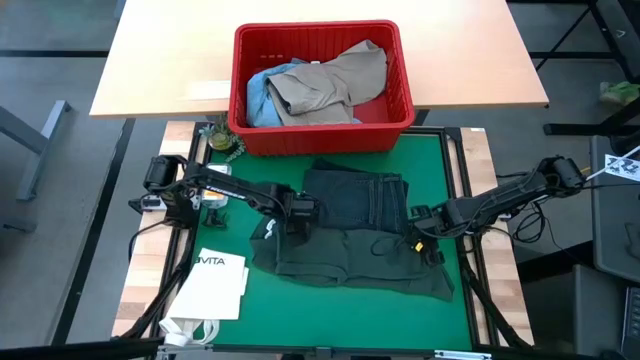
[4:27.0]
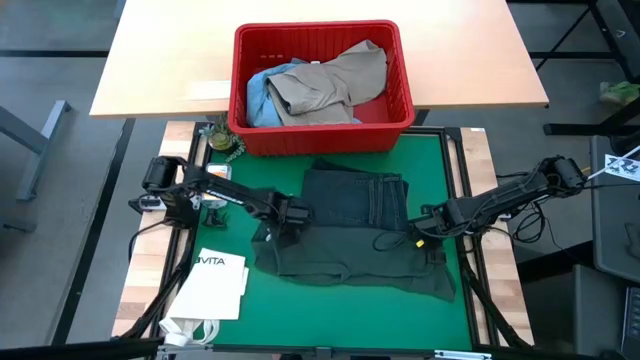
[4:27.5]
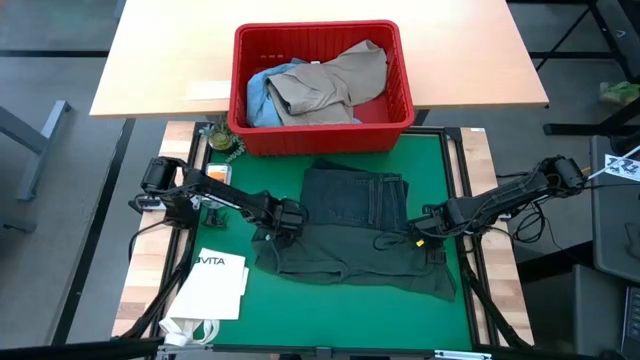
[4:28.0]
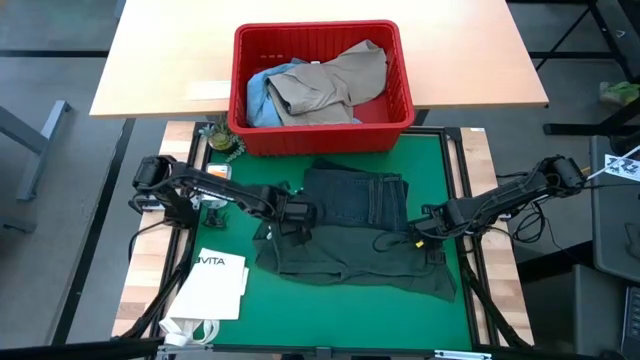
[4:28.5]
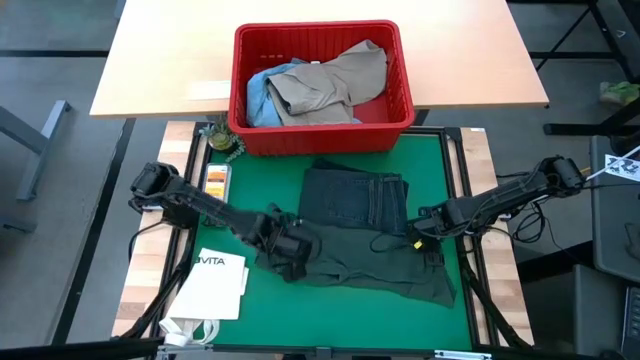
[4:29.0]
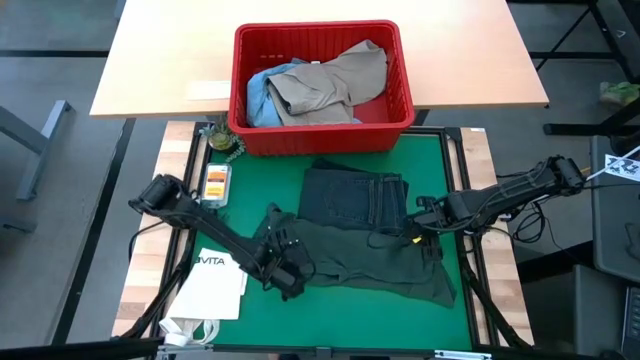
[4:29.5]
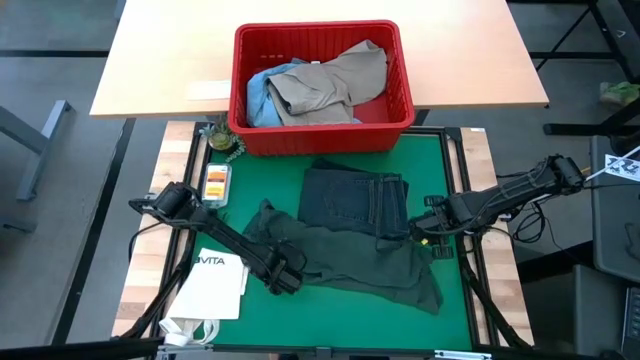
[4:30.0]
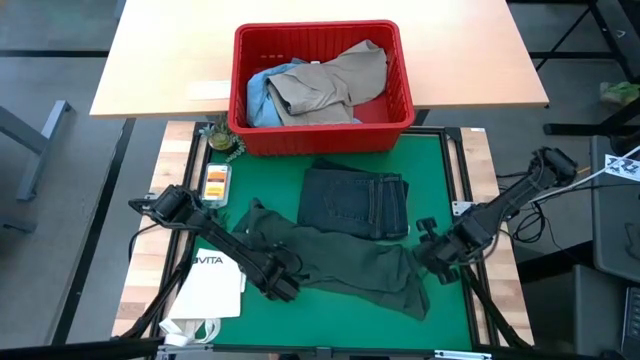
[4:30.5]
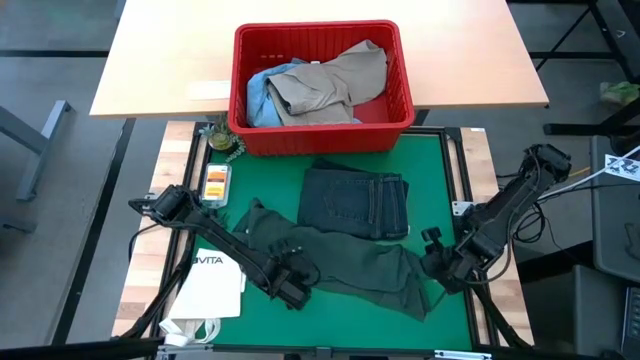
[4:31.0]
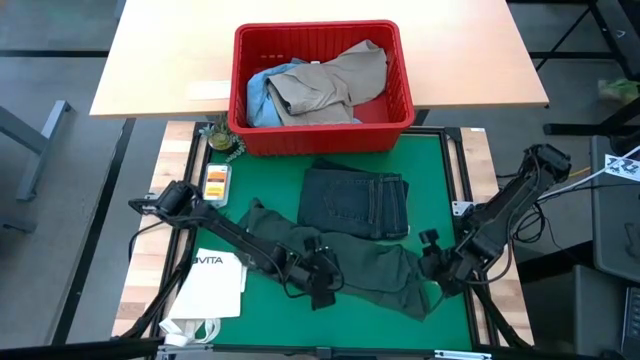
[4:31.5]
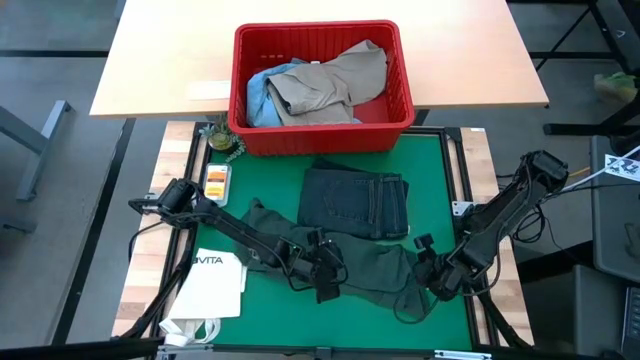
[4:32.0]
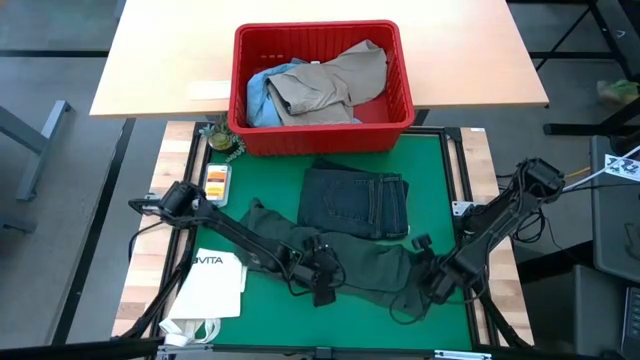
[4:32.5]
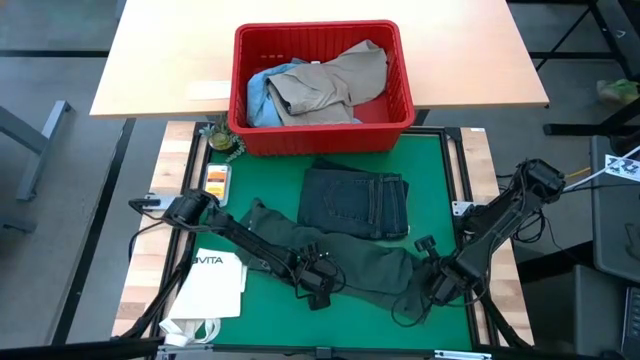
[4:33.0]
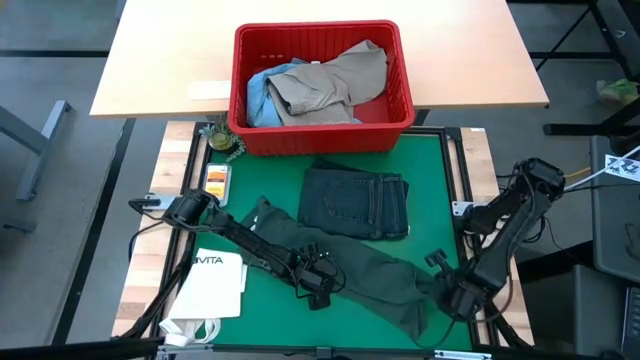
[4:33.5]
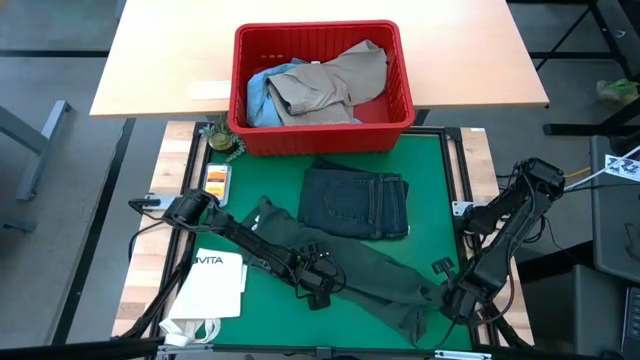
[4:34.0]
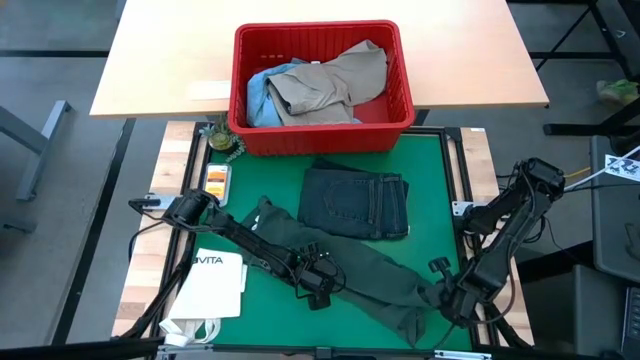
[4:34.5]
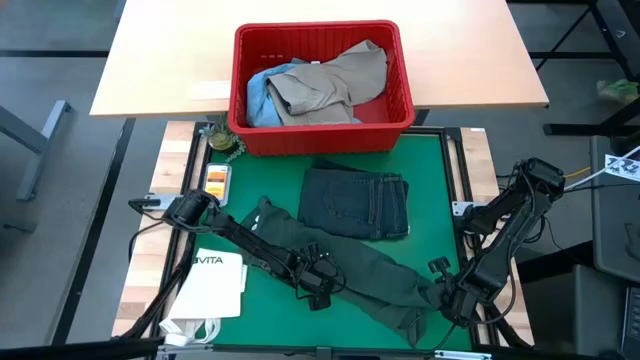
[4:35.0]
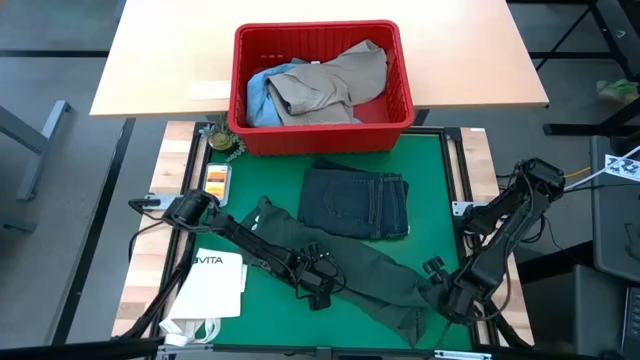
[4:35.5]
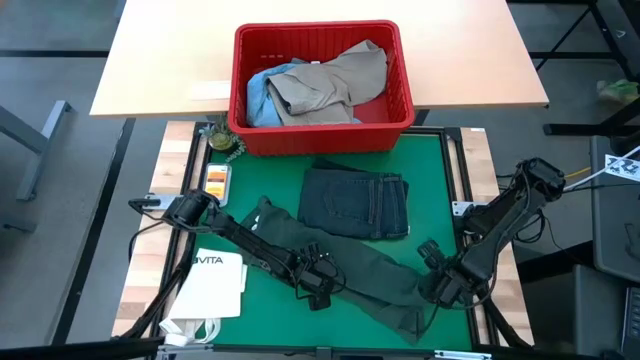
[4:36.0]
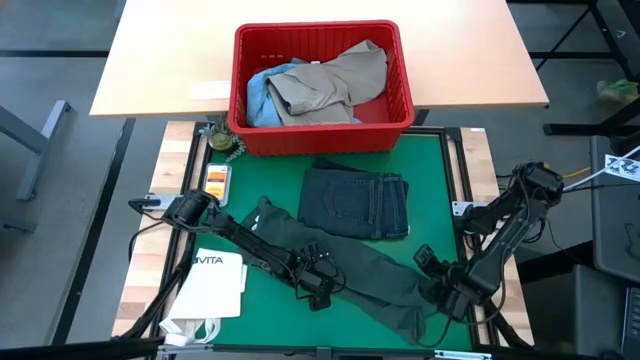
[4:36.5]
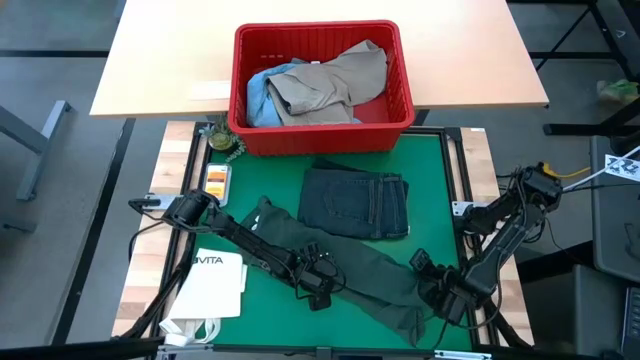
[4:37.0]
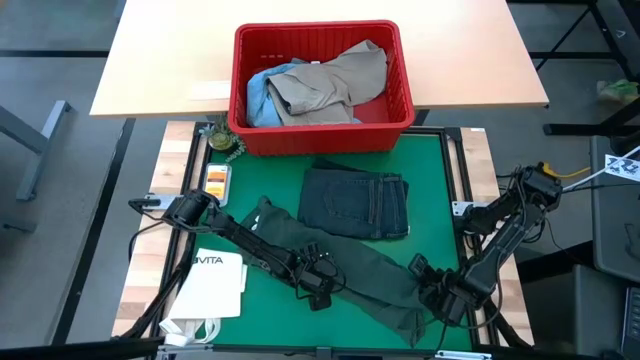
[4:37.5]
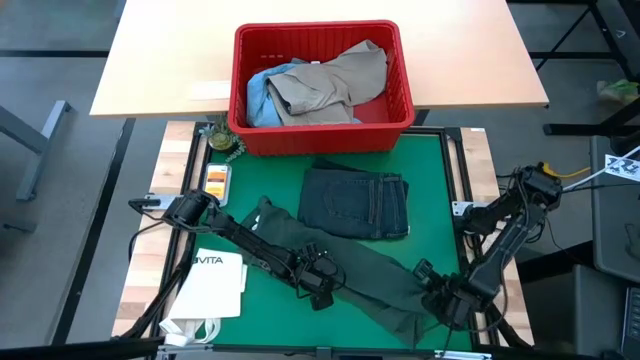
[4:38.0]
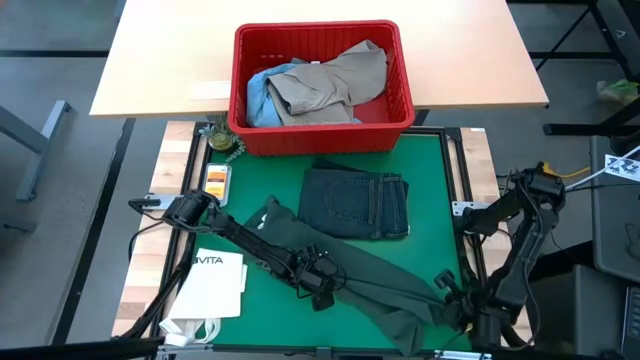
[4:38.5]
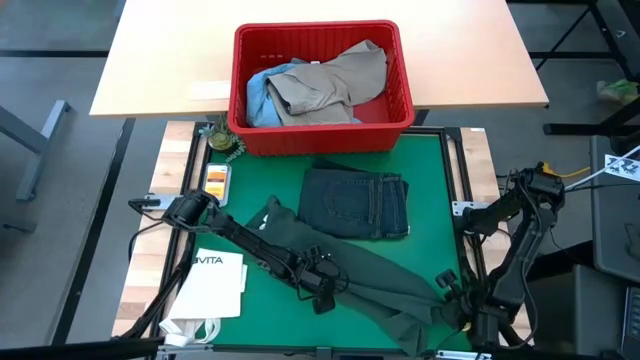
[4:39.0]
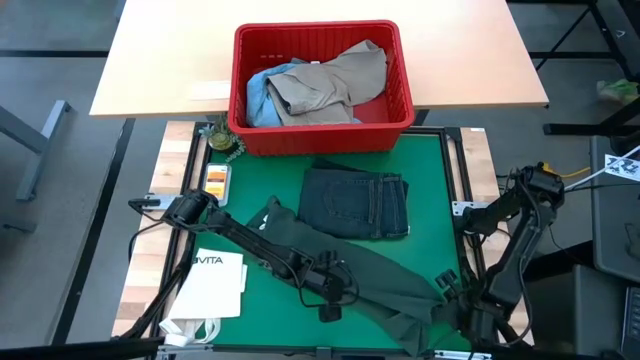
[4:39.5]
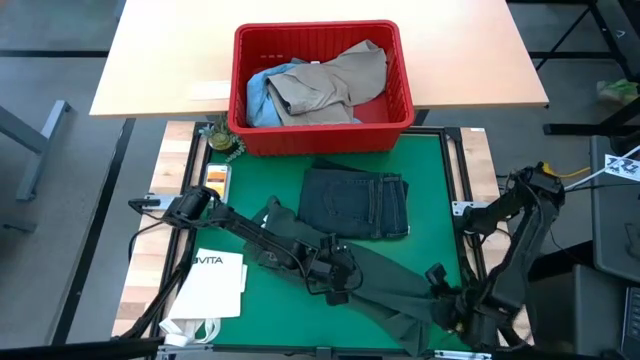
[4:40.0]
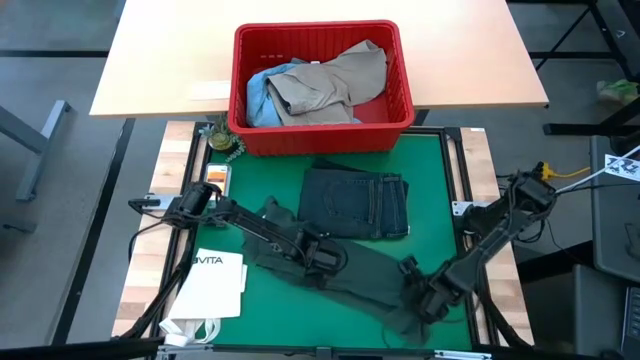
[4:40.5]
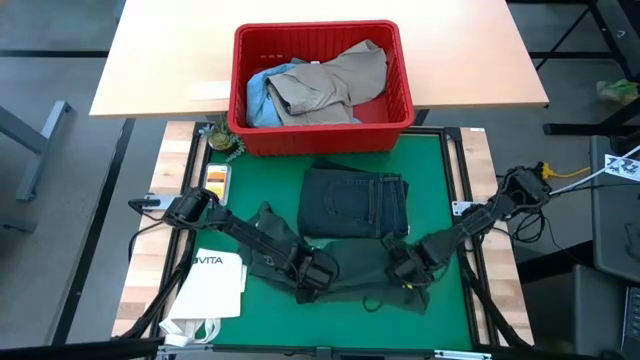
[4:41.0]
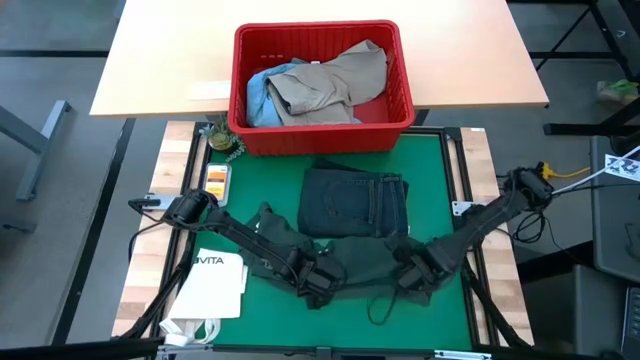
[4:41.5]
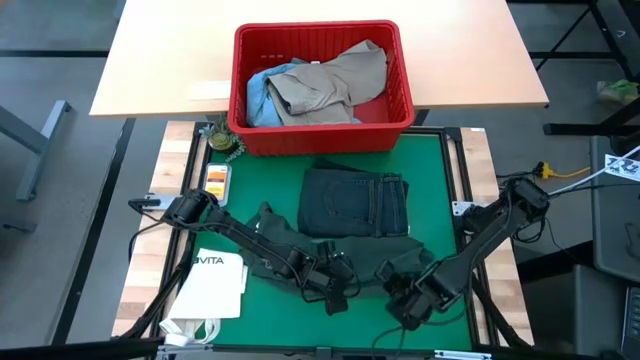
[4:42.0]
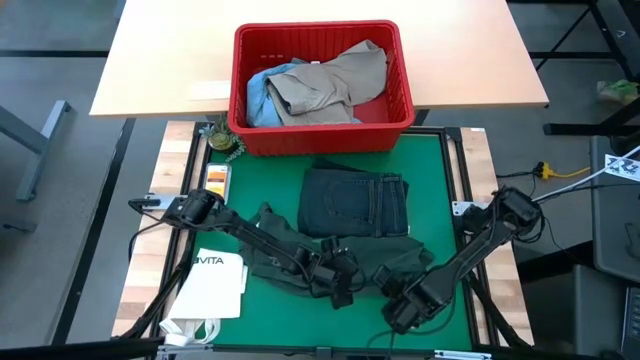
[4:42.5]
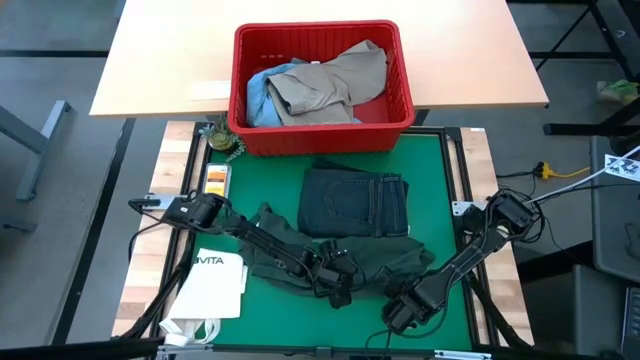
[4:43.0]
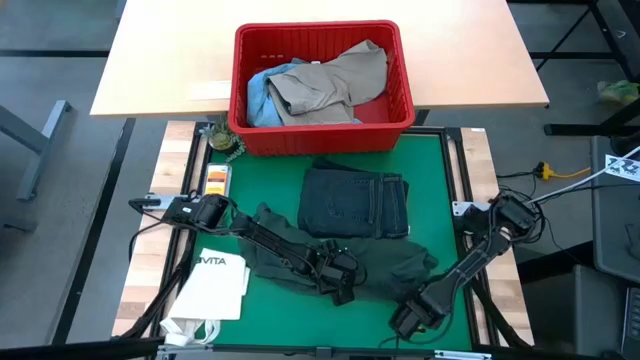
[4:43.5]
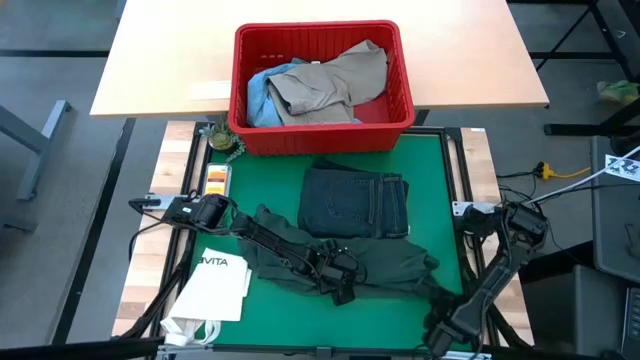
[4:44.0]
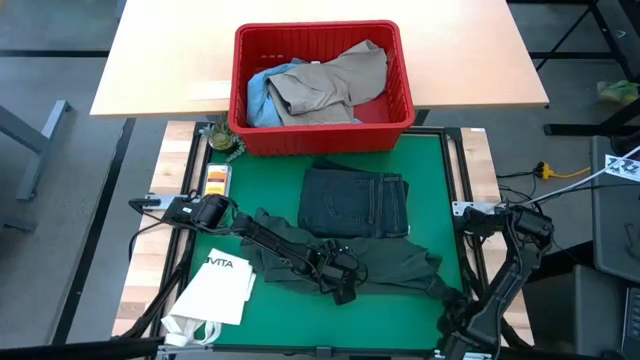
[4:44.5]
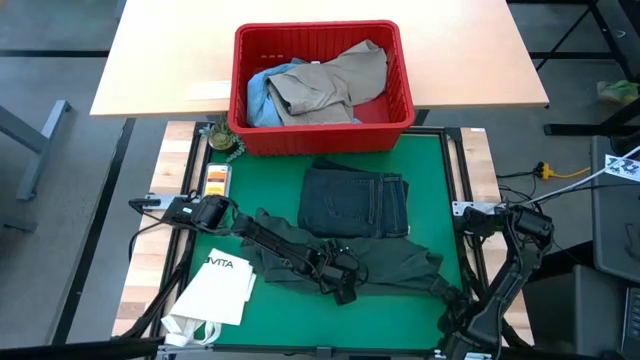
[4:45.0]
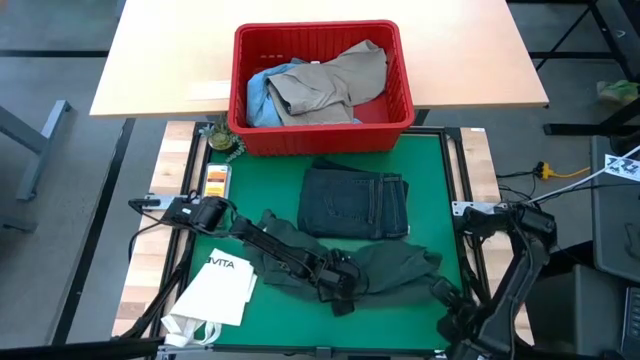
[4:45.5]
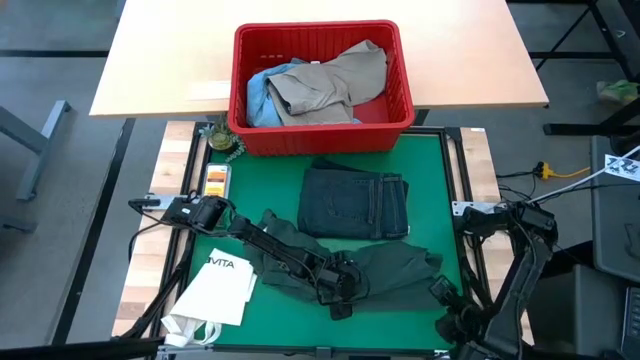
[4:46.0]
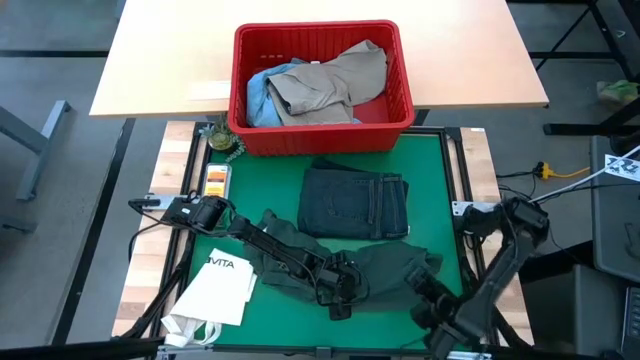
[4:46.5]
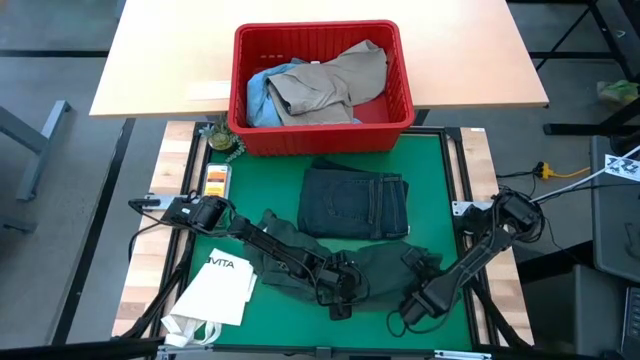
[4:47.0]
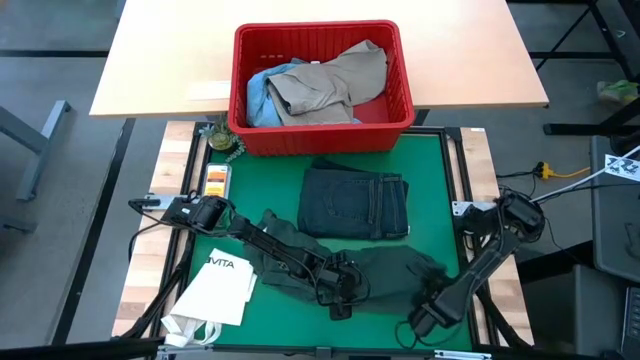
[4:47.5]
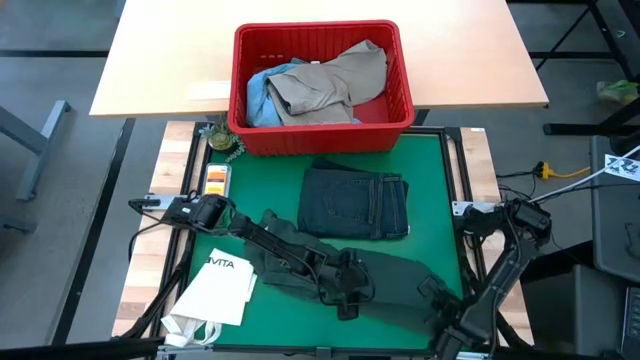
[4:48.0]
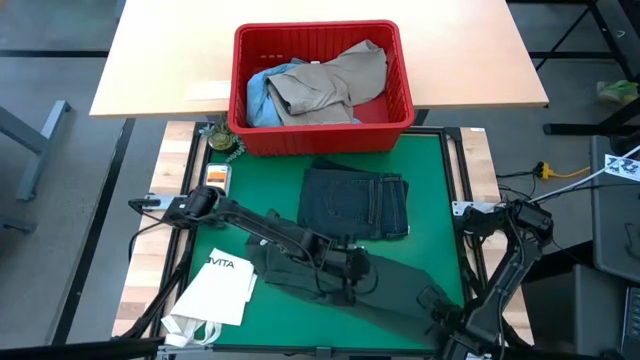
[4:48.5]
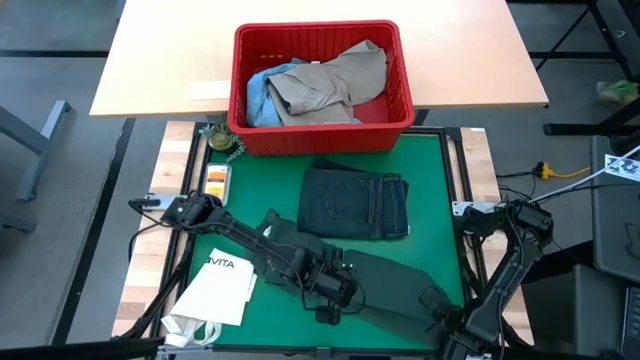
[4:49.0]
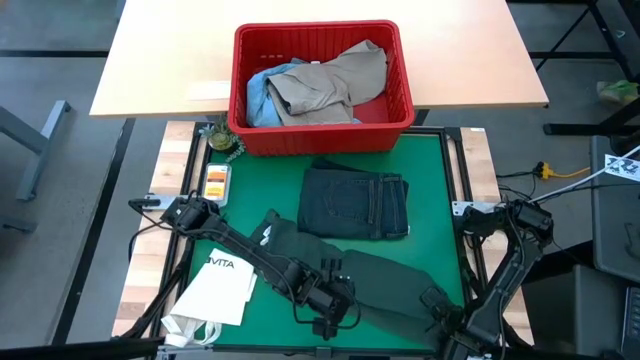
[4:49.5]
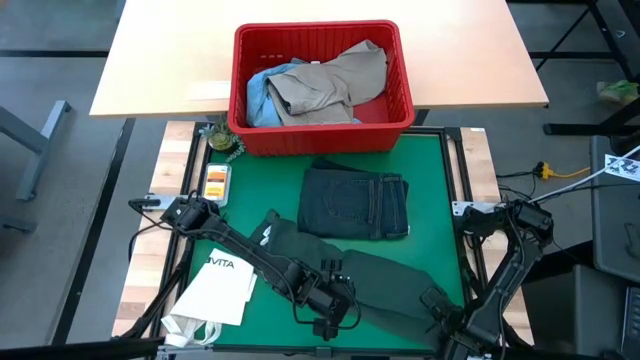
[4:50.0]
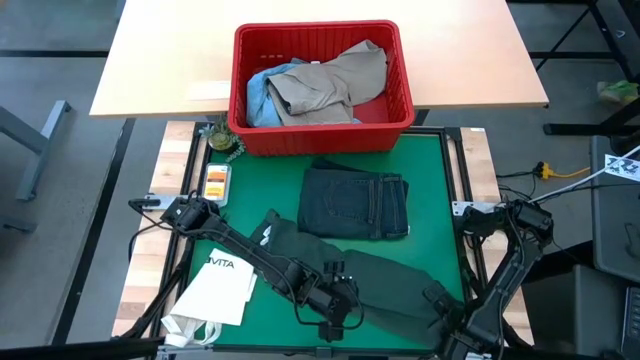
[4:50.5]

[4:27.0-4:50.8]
Task: Fold Laundry from Bin
Fold the green shirt
